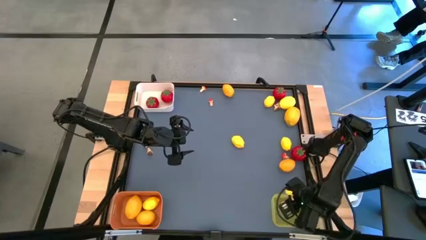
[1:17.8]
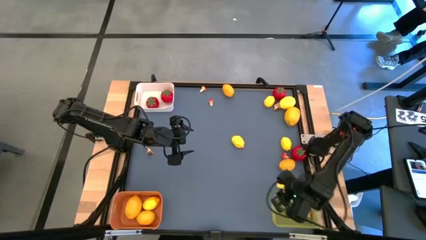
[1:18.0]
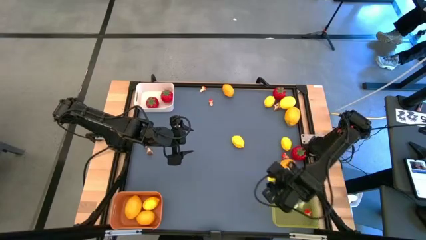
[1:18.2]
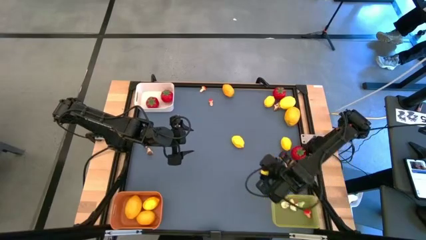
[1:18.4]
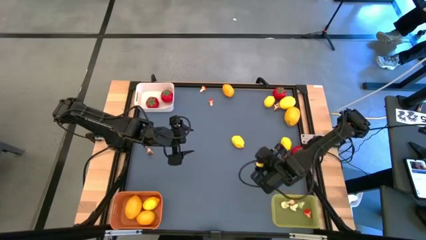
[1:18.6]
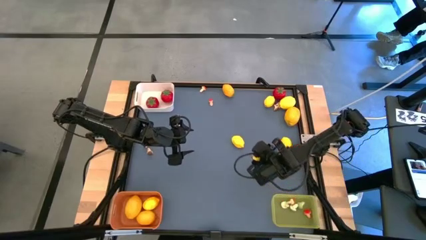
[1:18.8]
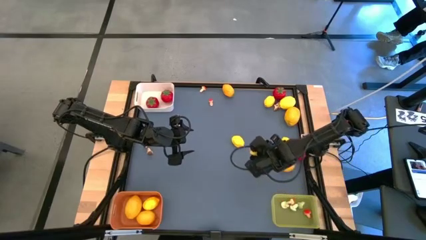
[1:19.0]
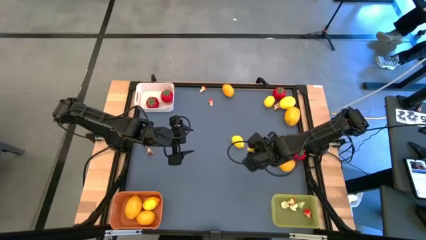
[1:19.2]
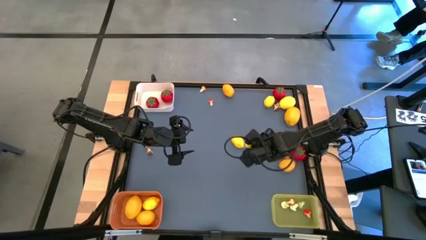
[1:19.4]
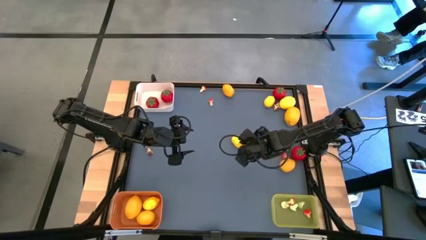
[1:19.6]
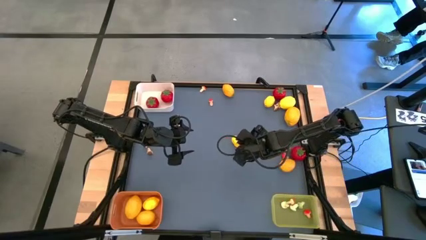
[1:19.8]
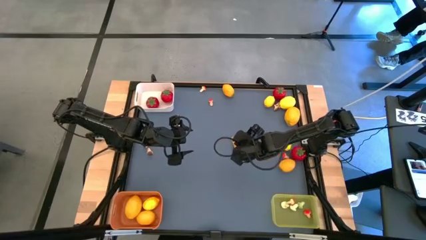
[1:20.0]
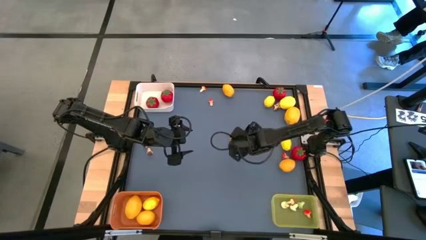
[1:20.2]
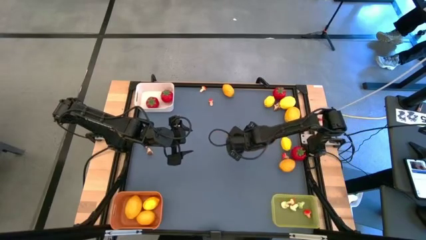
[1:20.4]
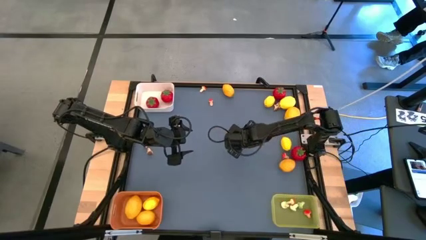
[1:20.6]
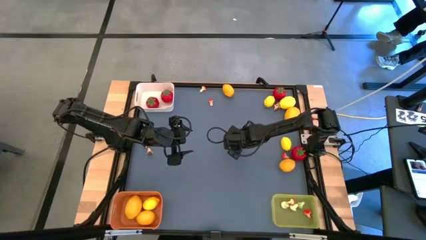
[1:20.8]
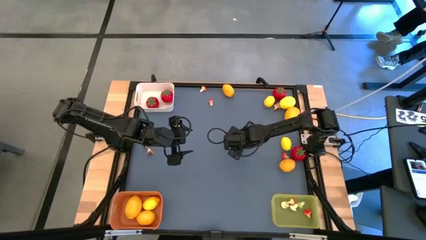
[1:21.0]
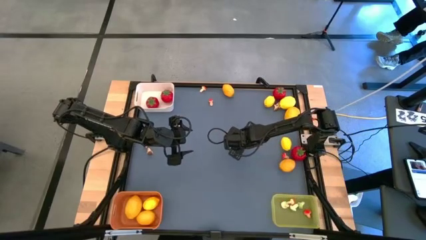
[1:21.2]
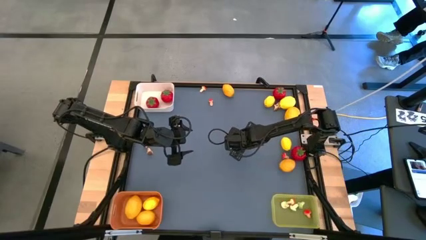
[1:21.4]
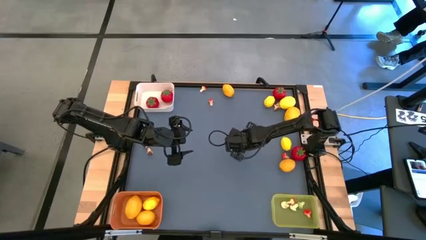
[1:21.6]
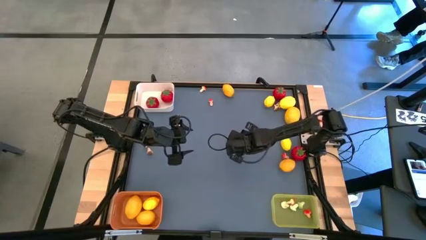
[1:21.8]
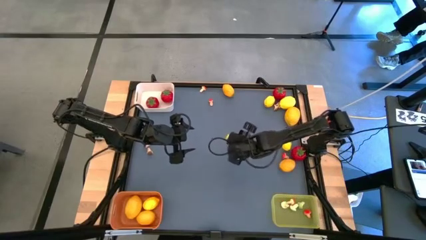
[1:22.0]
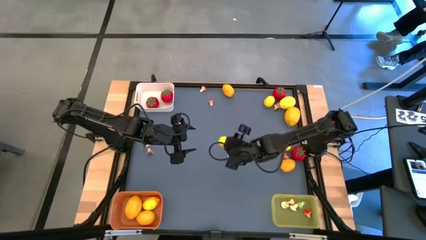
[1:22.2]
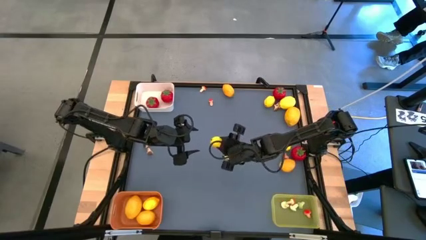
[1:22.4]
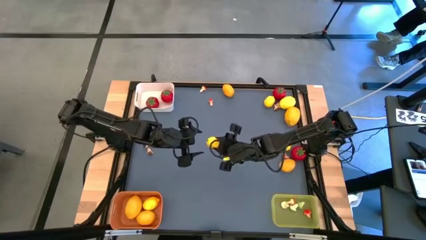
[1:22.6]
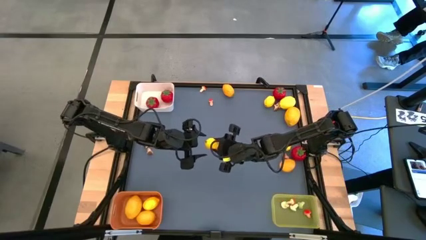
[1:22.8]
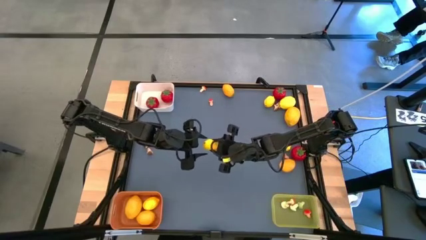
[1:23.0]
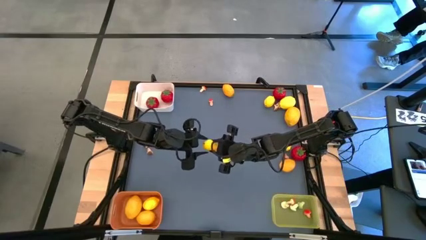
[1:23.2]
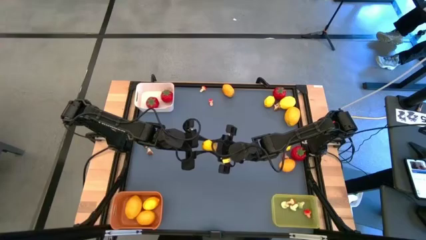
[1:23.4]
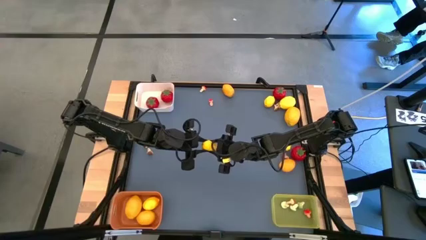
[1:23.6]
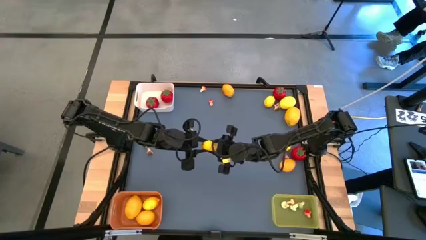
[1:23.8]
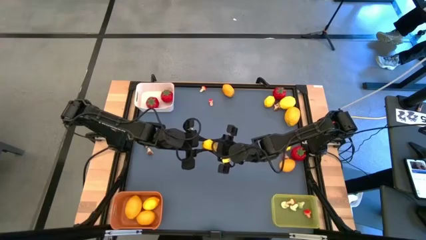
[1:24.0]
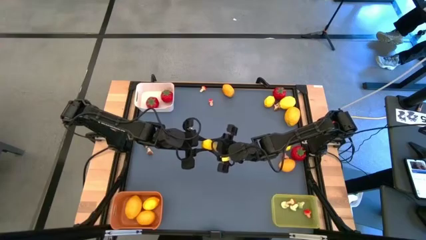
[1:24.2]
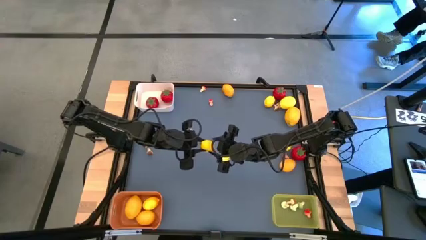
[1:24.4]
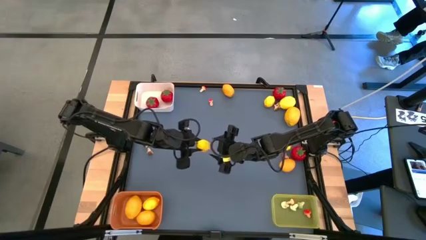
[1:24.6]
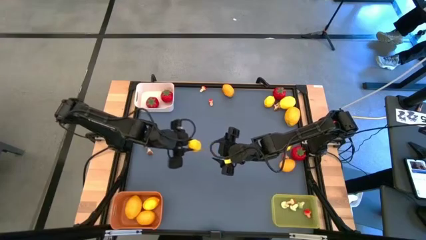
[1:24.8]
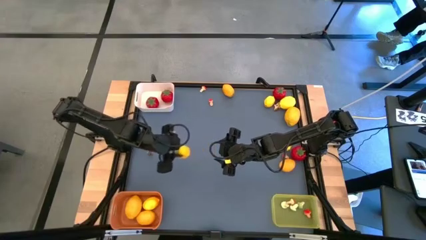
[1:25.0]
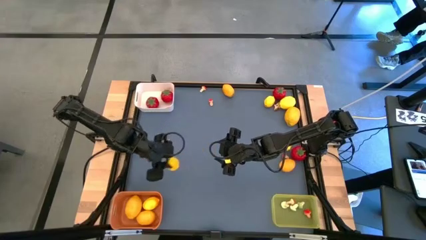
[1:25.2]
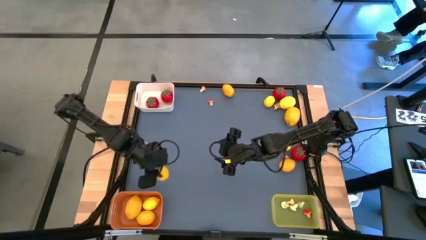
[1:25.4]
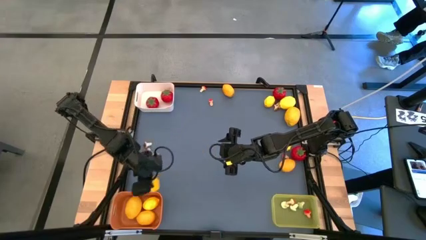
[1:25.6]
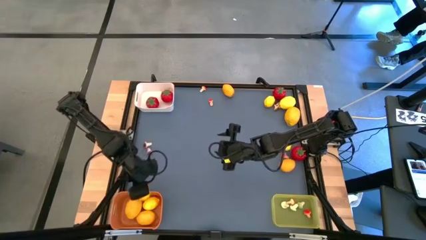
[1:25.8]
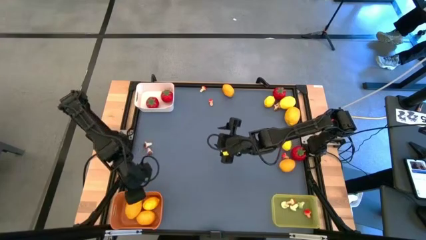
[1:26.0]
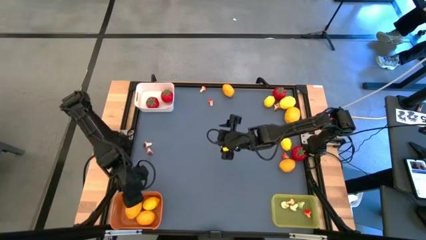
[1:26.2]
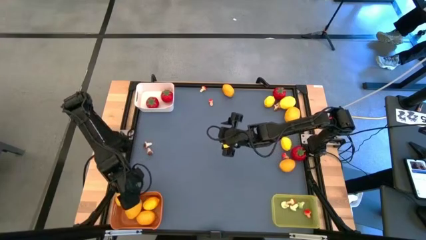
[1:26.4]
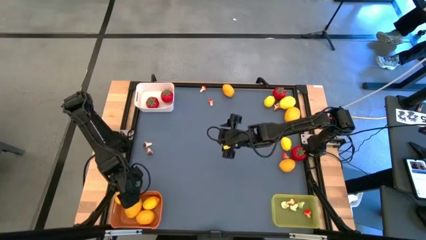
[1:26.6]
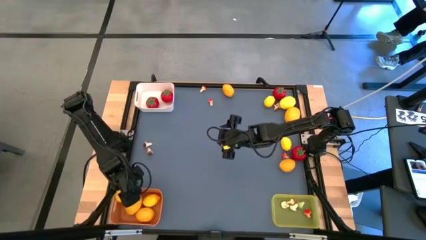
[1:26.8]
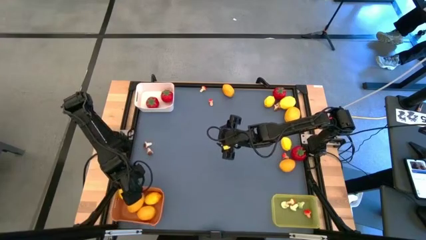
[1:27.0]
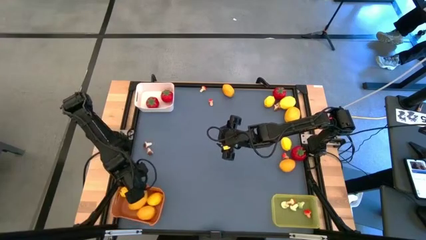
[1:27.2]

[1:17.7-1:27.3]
Task: Sort produce into baskets
Put the yellow lemon into the orange bin

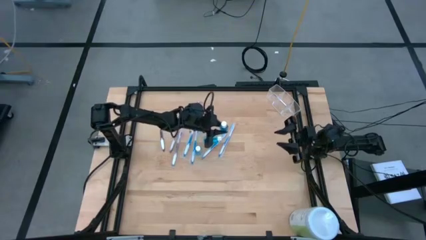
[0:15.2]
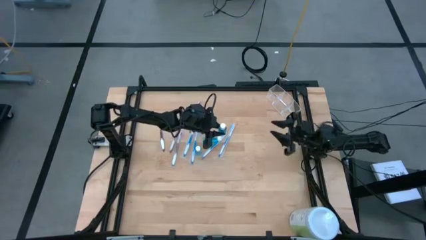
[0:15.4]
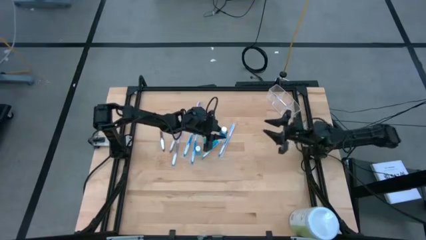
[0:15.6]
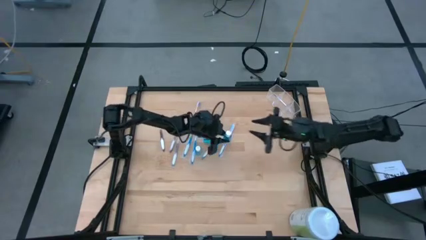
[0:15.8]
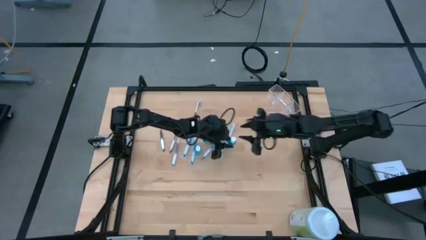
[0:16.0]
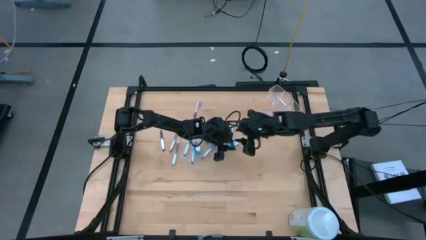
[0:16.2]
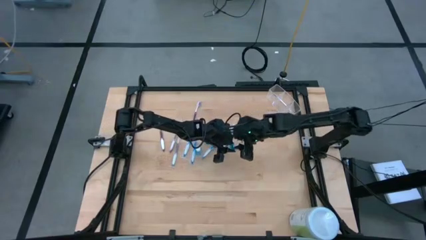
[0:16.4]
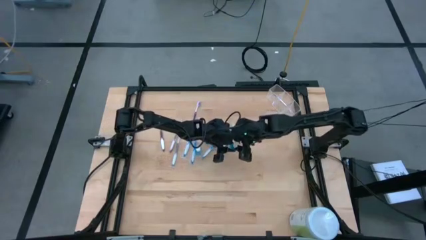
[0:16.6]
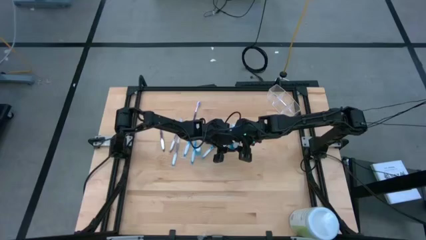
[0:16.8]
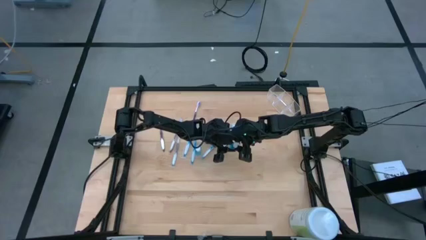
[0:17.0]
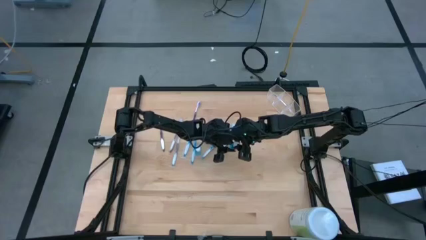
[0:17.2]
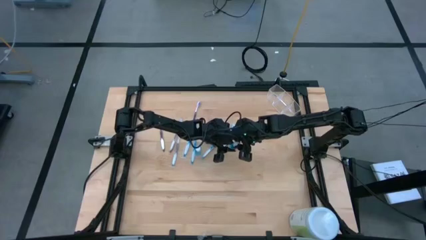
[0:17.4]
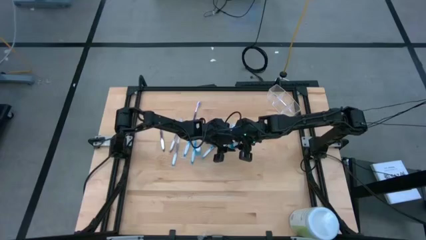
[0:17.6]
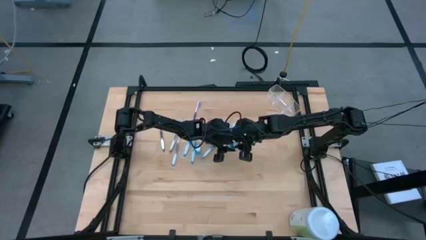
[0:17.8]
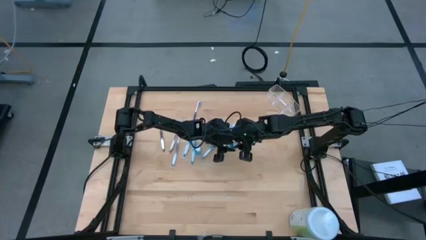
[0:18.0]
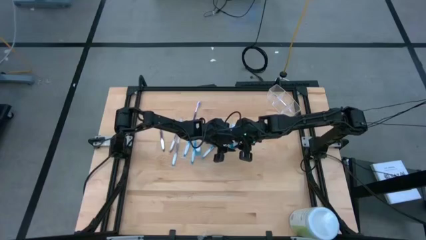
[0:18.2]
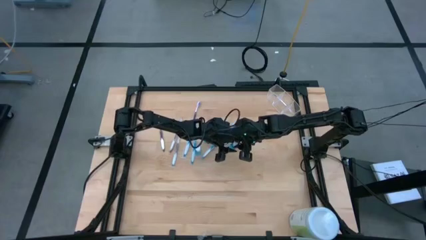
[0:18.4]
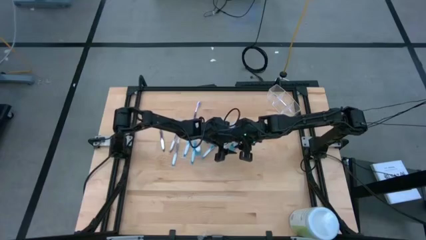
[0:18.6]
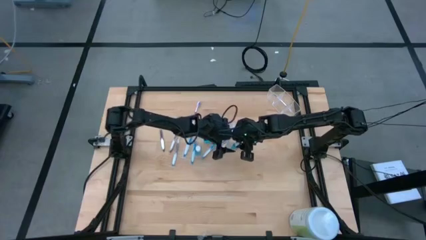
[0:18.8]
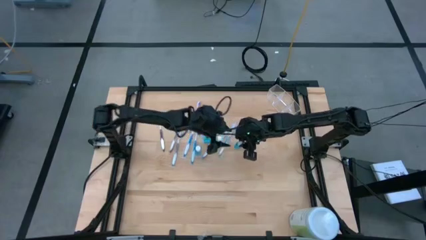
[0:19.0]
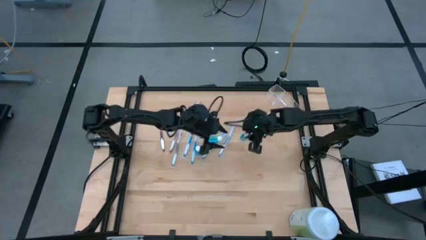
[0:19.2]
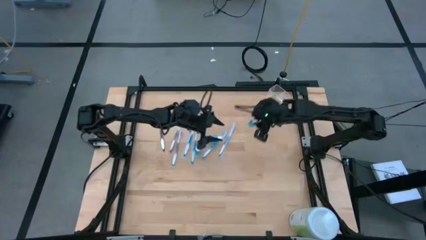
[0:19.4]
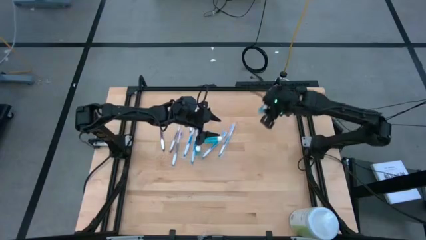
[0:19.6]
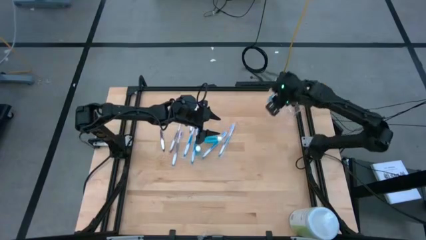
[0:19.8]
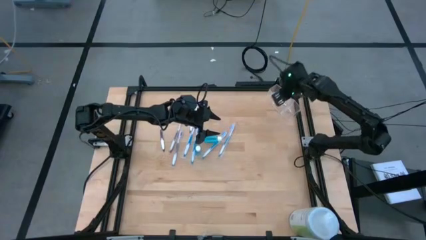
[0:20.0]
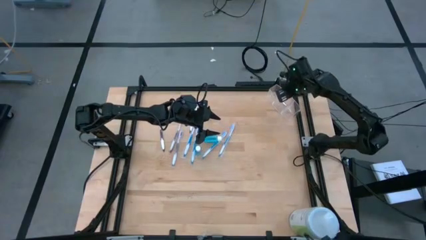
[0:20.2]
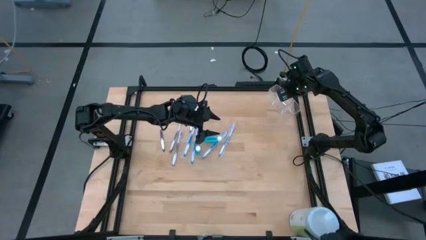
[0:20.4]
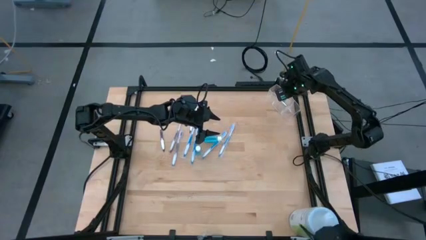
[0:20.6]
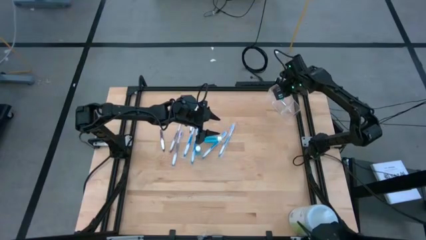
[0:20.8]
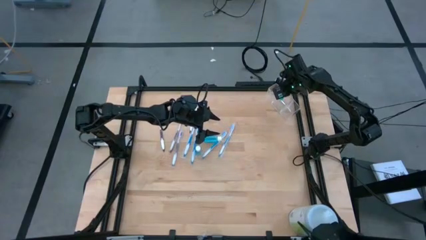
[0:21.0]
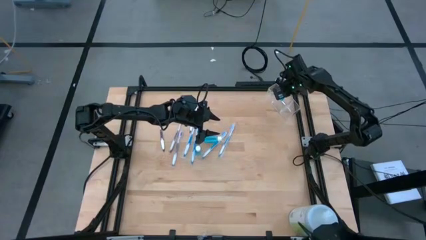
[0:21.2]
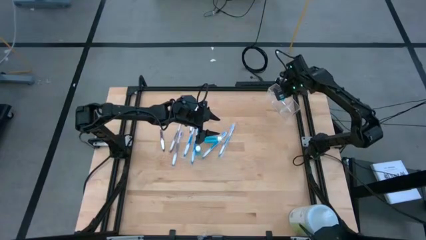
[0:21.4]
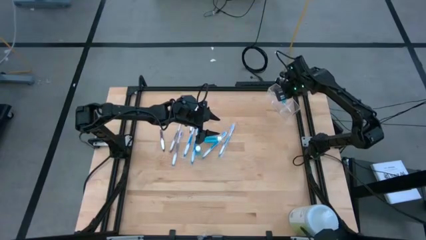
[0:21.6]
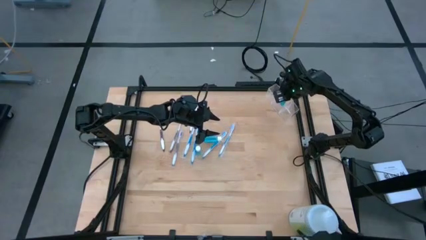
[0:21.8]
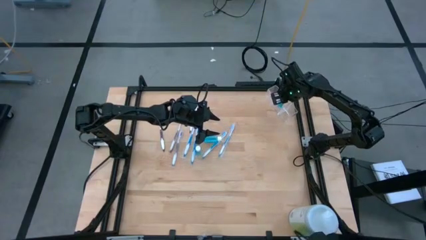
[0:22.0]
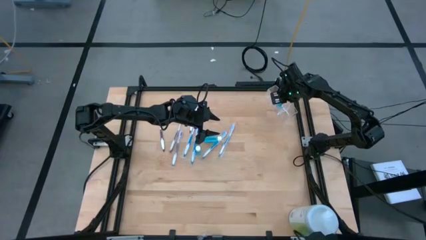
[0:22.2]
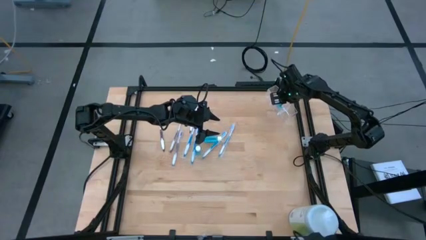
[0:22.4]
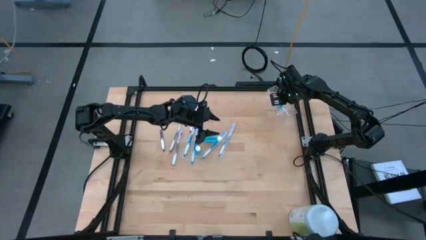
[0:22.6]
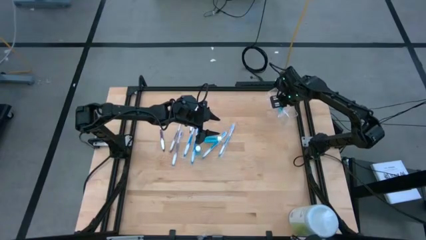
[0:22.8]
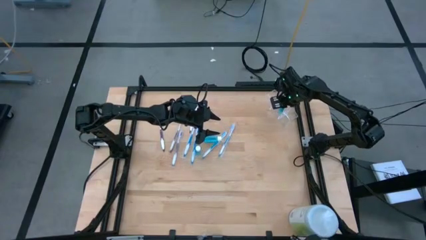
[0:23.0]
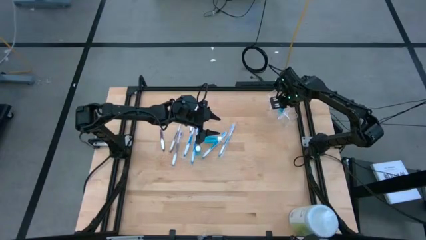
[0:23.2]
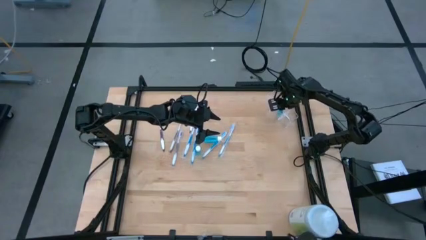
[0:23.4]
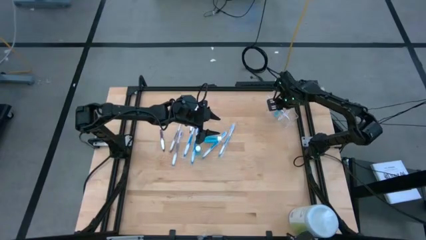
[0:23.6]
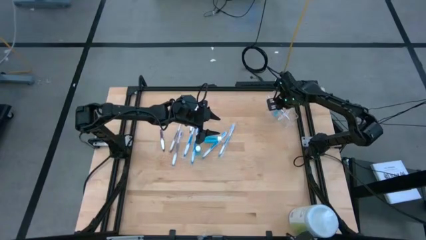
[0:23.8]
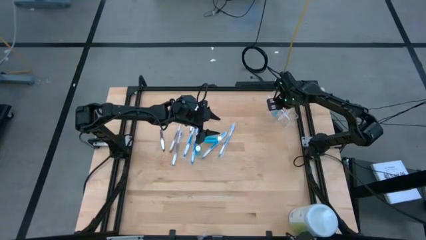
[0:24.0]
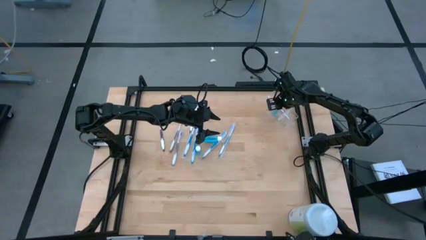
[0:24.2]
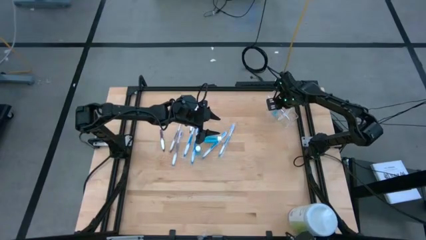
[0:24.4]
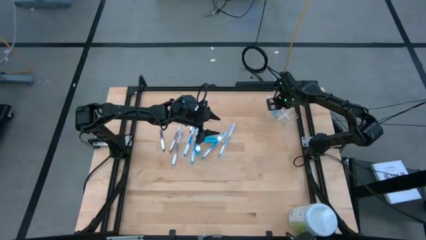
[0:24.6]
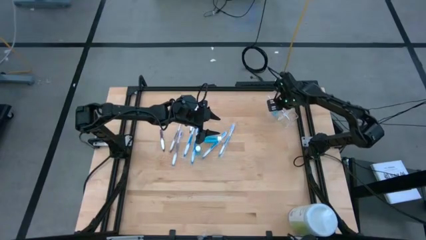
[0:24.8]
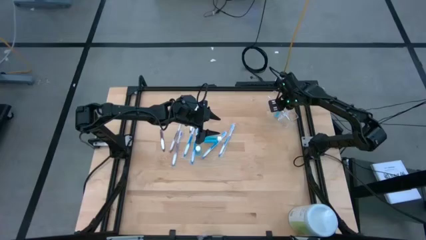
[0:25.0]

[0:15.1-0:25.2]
Task: Pick & Place toothbrushing station
Put the blue mouthwash into the middle of the transparent organizer
